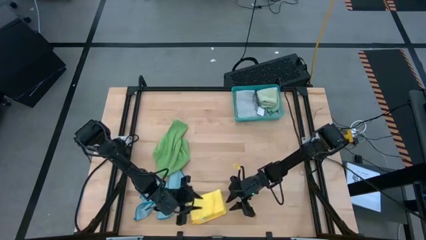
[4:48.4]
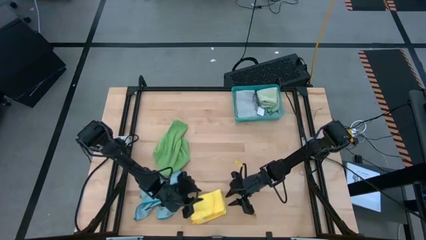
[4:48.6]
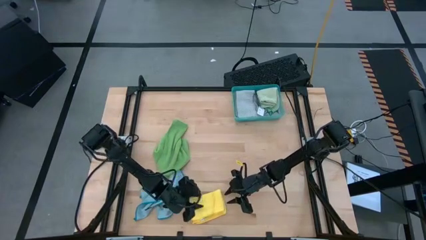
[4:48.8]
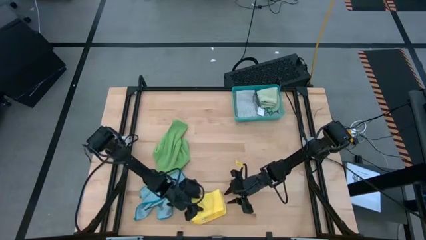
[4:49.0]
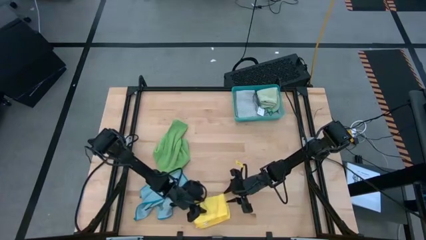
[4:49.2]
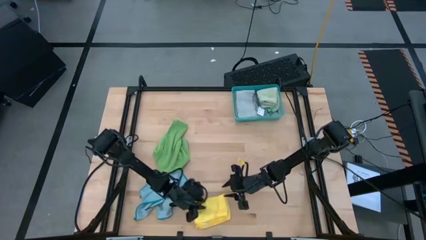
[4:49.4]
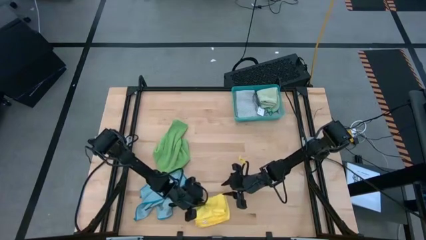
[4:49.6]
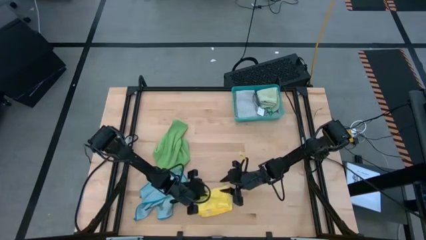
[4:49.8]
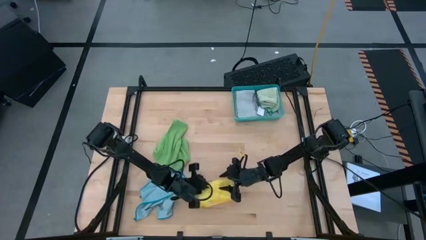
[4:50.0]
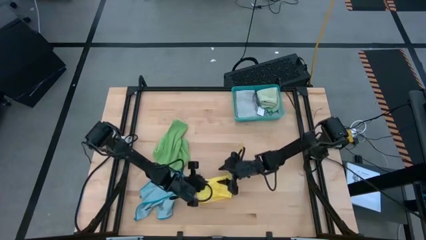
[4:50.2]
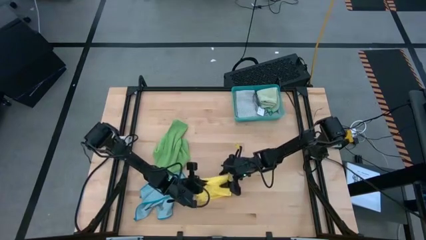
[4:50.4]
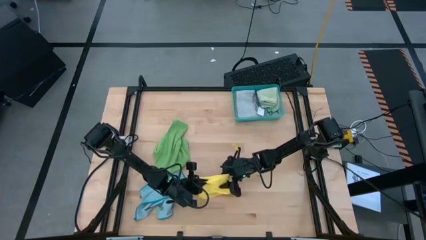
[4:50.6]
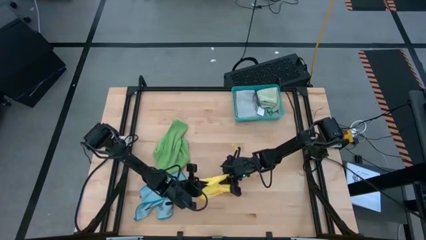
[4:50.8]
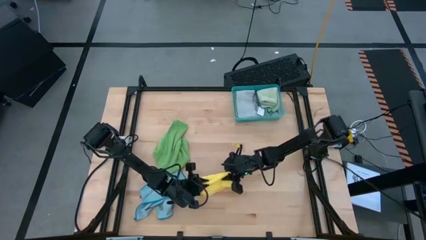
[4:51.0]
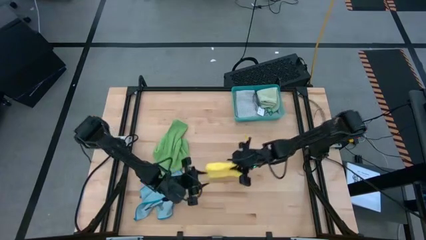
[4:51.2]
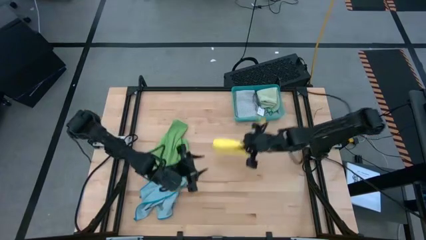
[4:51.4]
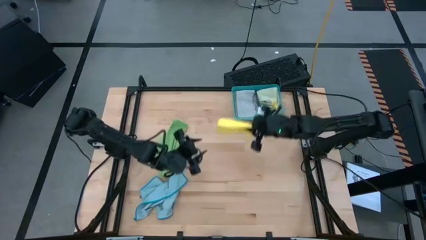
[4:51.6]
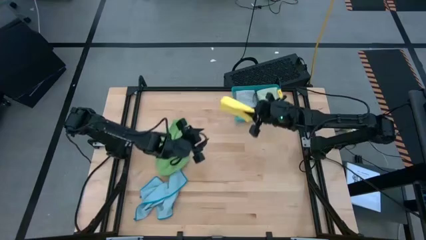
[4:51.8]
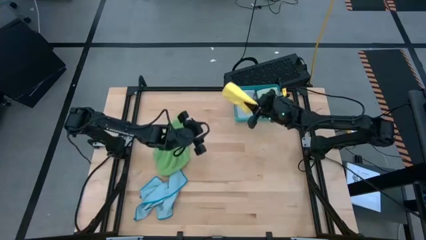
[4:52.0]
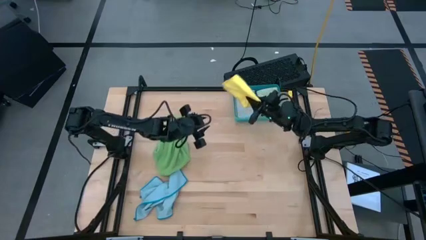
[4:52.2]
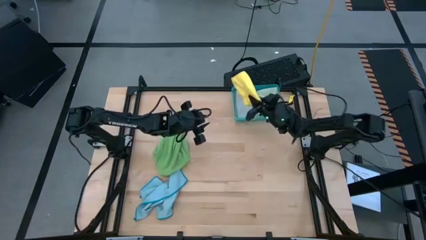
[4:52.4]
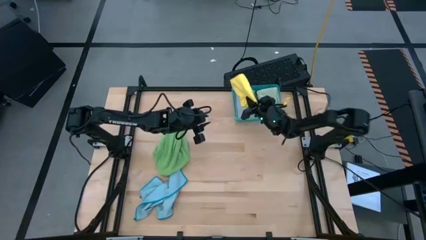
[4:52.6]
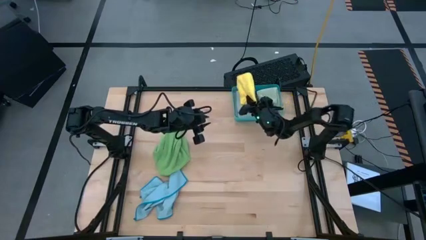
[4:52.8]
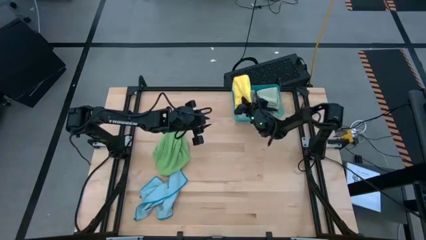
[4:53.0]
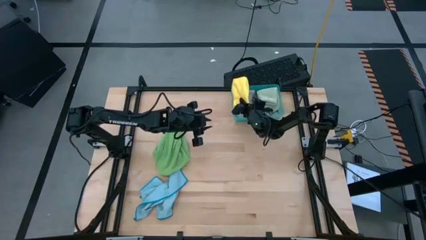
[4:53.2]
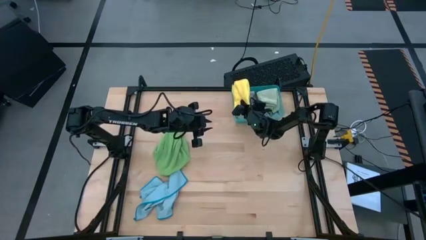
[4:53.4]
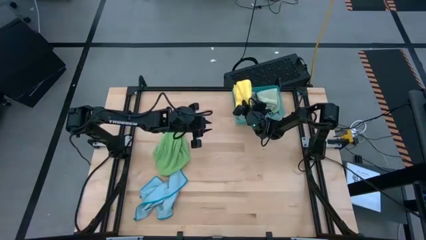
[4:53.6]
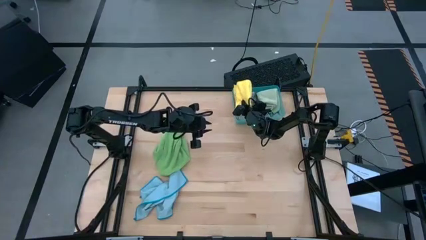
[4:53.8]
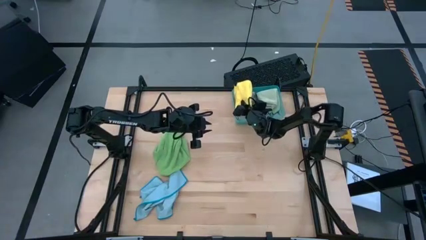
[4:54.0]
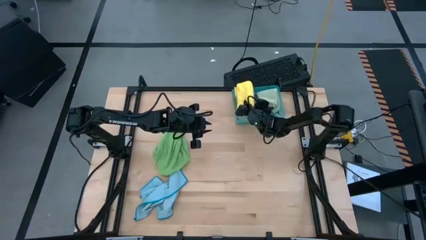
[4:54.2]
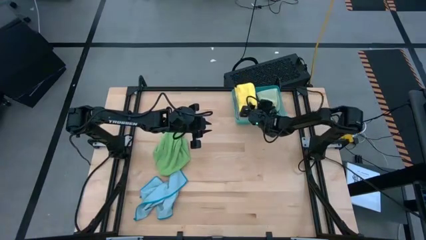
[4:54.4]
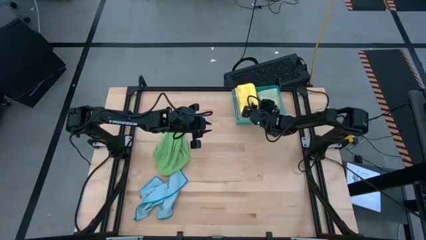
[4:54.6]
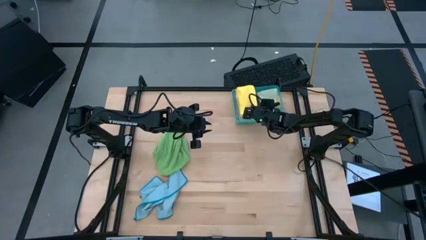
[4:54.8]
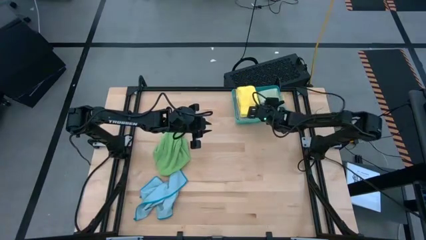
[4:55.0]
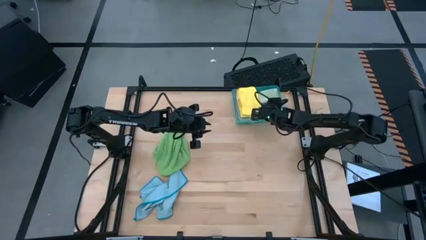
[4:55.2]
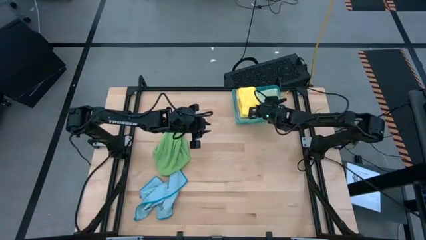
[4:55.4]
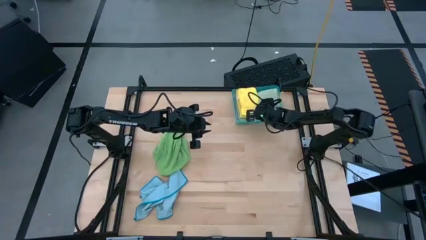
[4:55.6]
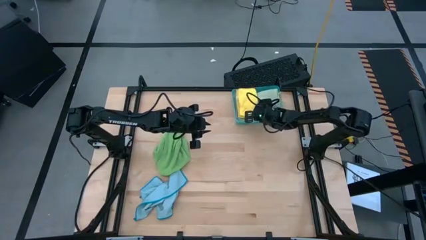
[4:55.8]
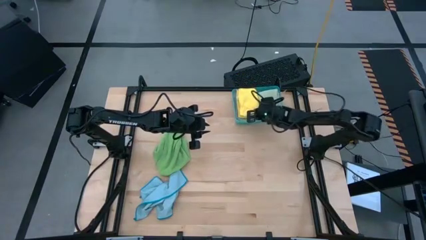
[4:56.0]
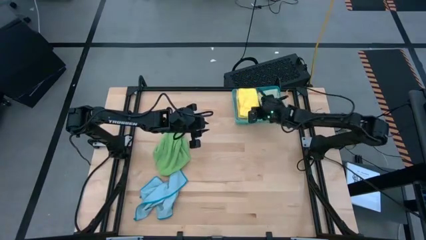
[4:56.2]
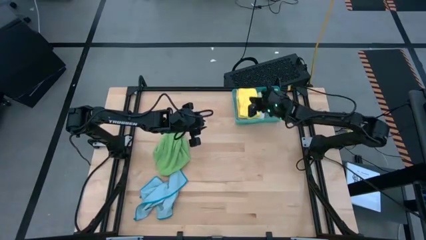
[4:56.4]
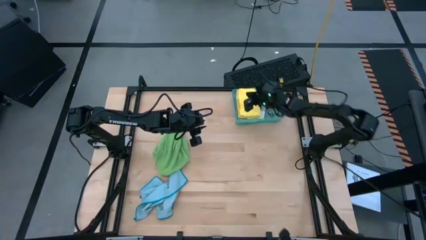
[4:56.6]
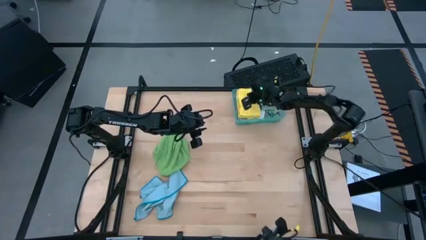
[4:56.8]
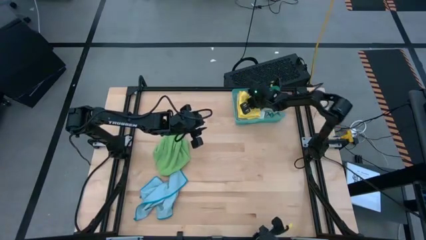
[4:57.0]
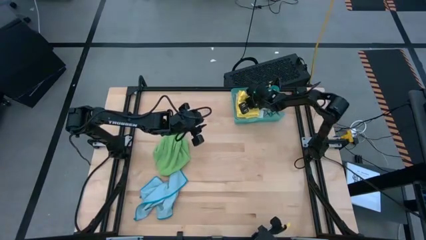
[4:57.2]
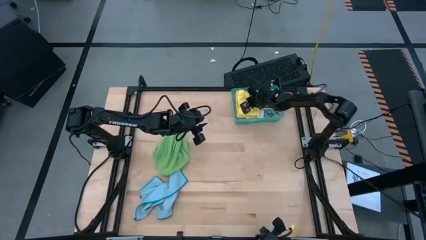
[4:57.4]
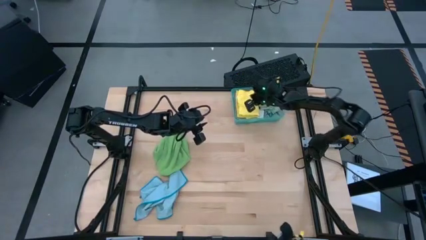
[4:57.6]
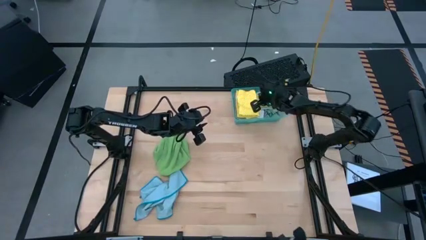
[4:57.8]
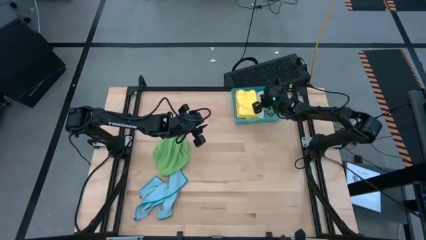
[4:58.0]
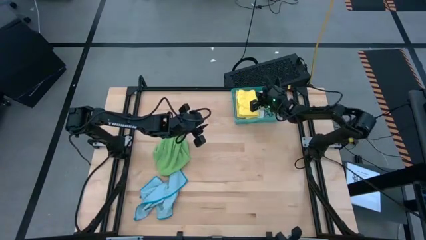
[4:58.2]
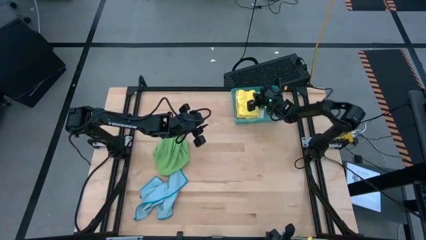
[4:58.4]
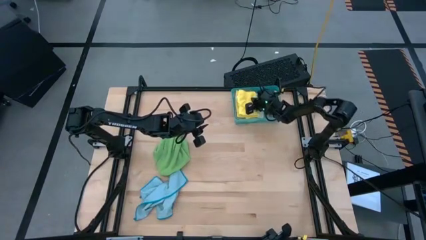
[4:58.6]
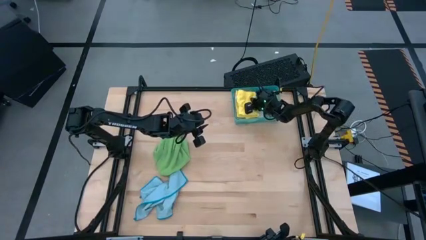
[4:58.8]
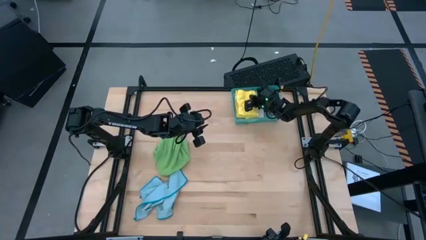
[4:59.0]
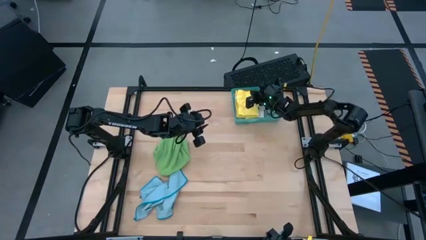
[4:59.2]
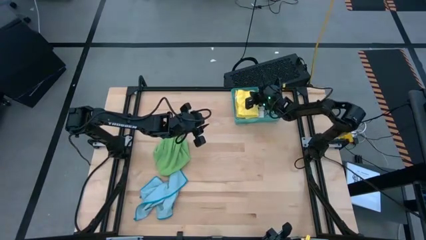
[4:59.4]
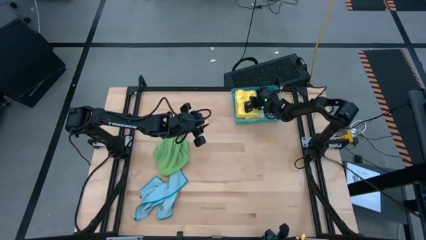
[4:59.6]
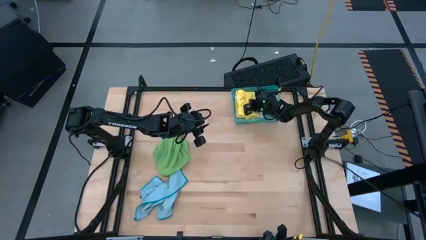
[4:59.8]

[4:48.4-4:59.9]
Task: Fold microfiber towels
Put the folded yellow microfiber cloth into the bin

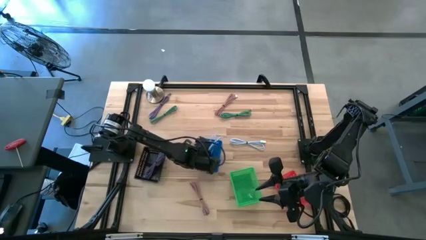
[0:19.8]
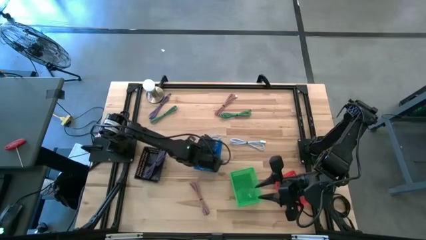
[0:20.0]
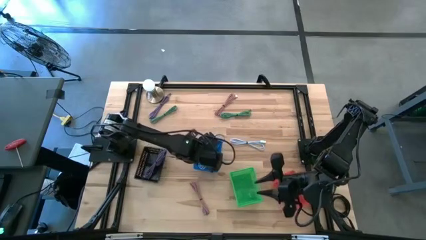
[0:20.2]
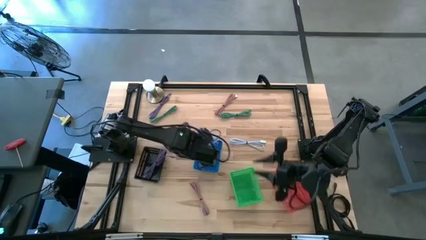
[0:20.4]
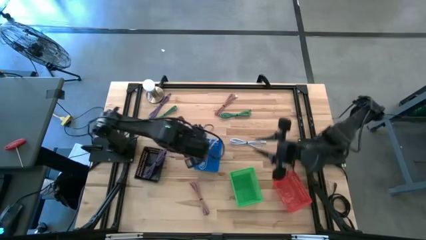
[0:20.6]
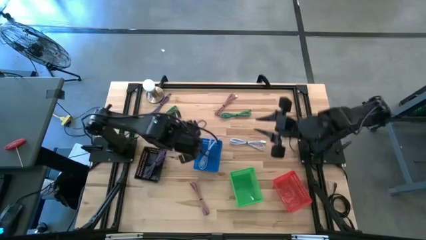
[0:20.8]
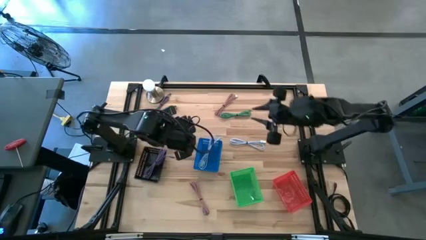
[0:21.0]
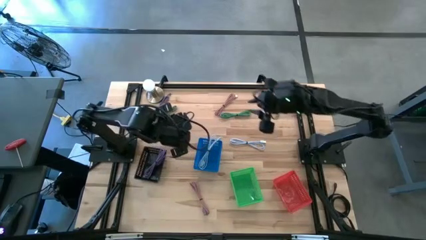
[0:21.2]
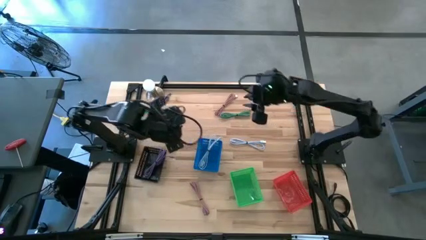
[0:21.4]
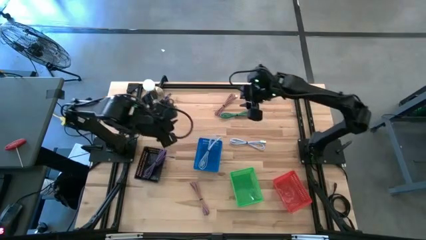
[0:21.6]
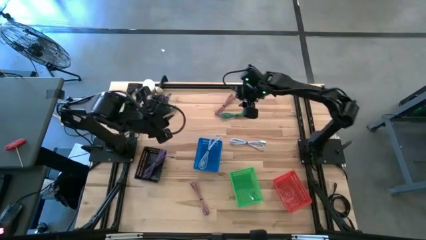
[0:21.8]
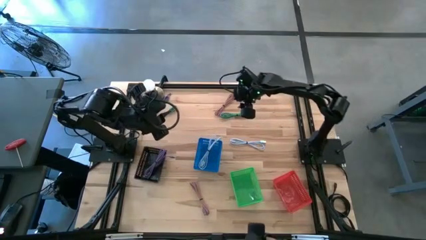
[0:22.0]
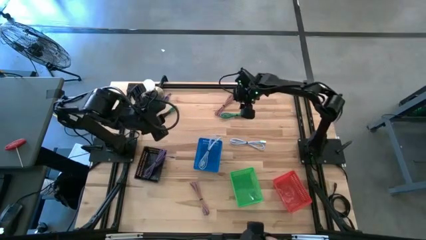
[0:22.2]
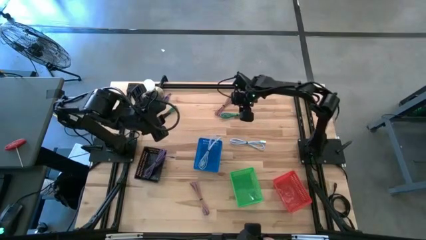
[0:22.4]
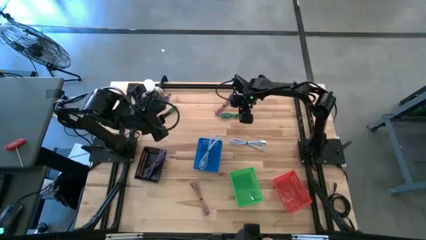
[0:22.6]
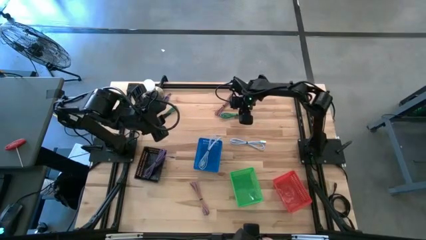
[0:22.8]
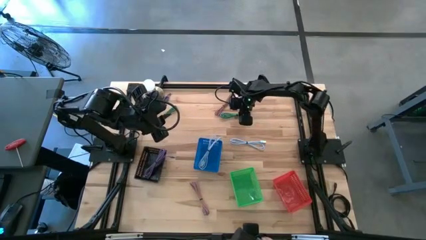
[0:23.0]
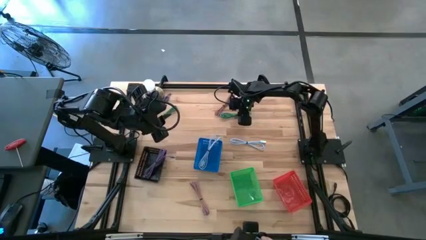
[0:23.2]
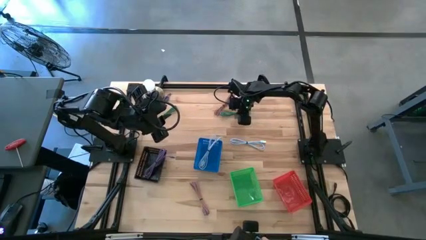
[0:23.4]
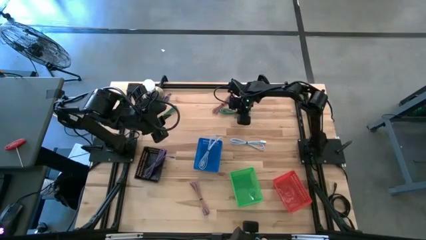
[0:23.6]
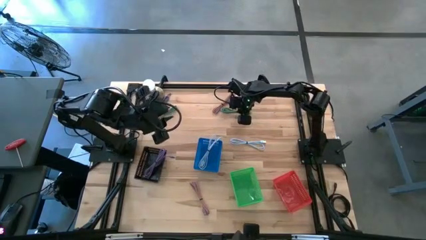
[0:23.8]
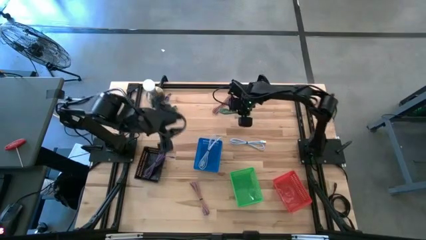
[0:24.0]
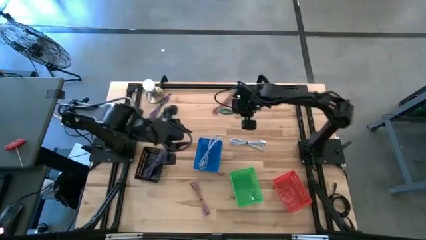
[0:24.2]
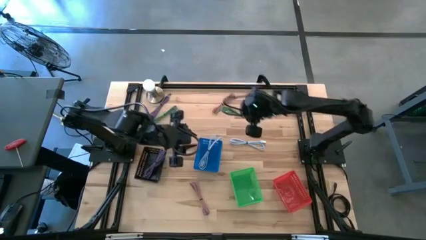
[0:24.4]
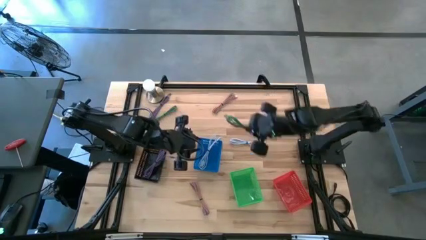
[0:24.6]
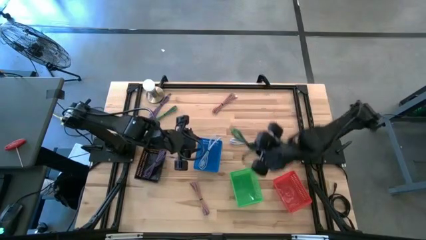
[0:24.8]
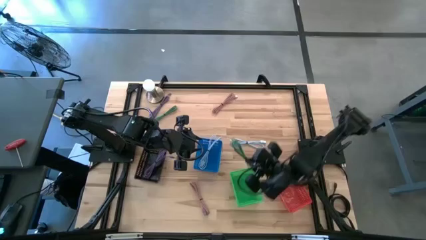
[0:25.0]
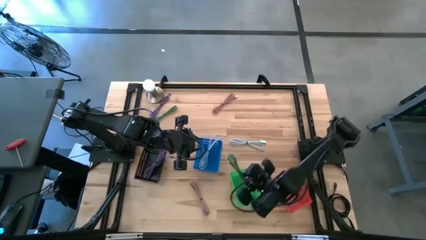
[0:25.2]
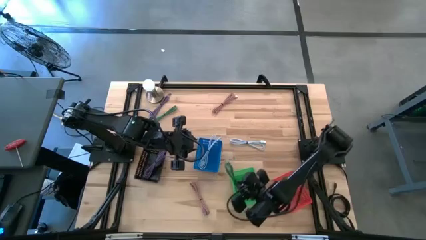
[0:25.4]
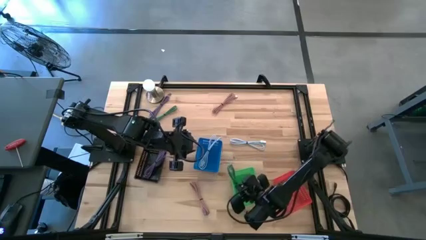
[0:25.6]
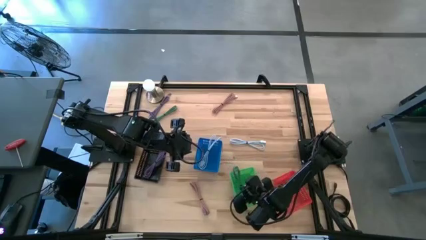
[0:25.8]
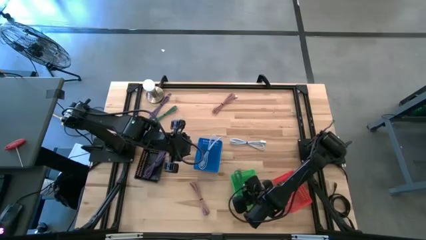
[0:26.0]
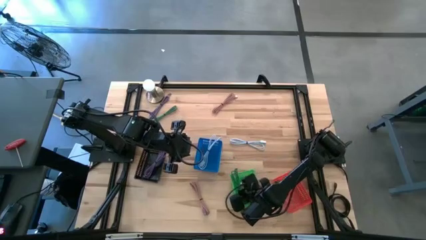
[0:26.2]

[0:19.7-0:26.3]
Task: Pick & Place USB Port
Put the right green USB cable into the green bin
